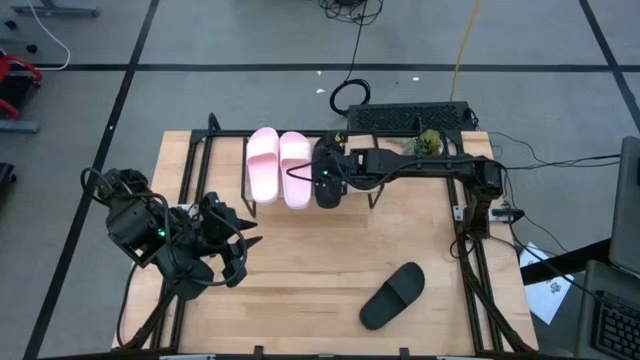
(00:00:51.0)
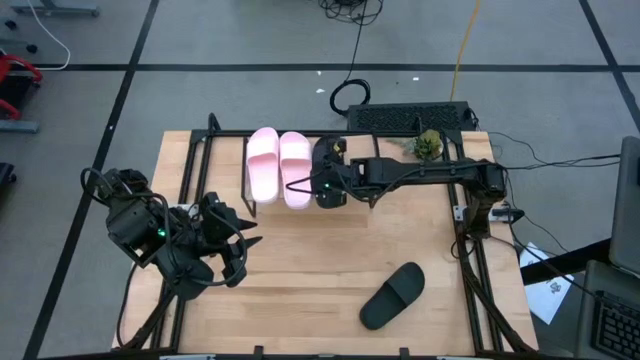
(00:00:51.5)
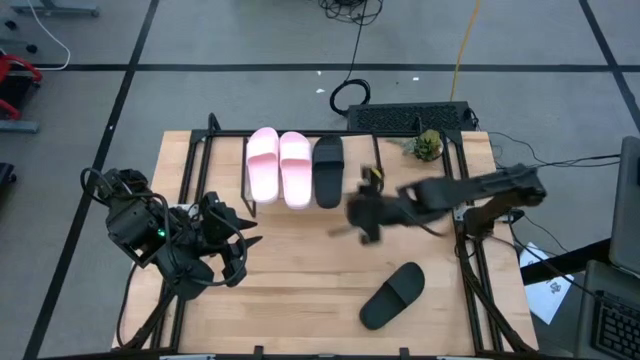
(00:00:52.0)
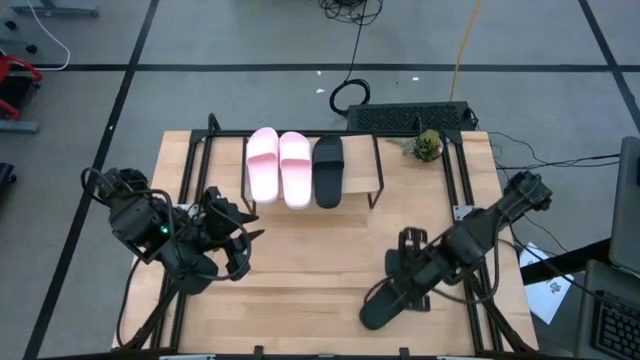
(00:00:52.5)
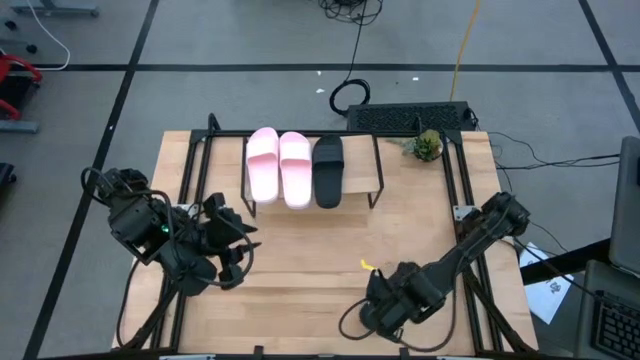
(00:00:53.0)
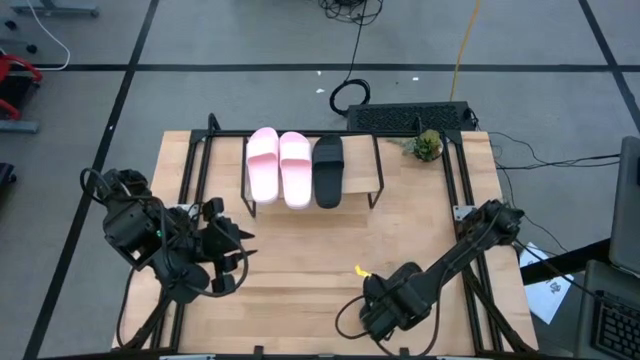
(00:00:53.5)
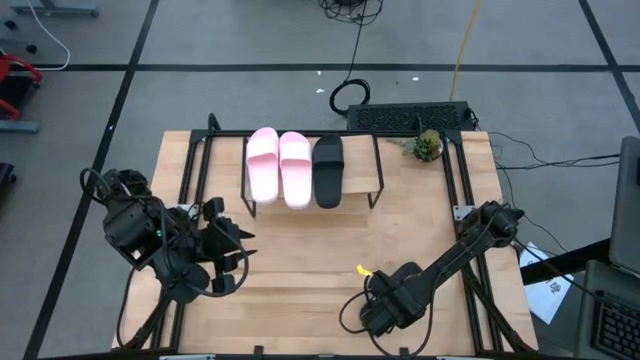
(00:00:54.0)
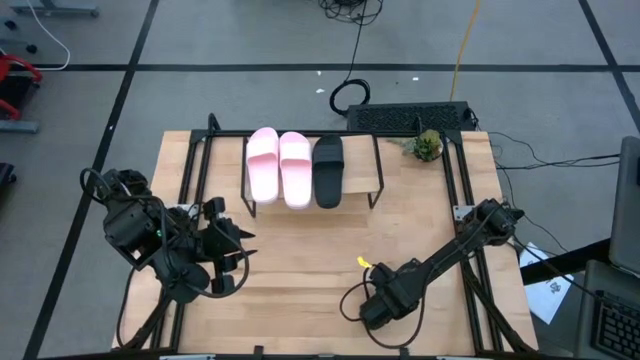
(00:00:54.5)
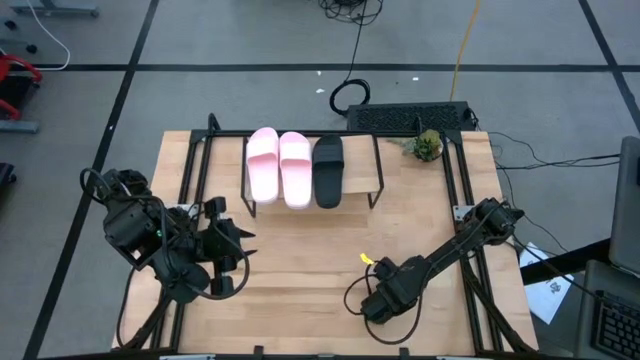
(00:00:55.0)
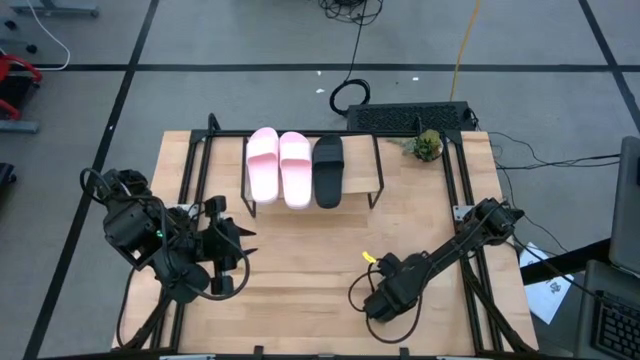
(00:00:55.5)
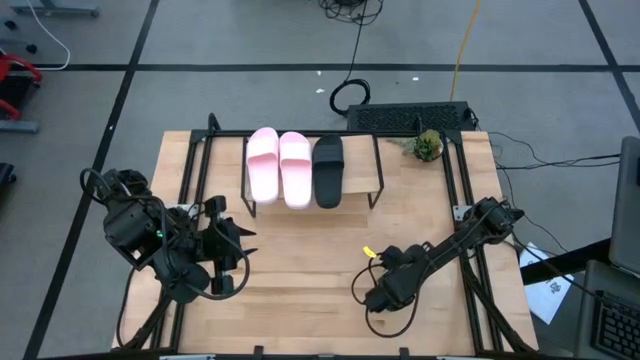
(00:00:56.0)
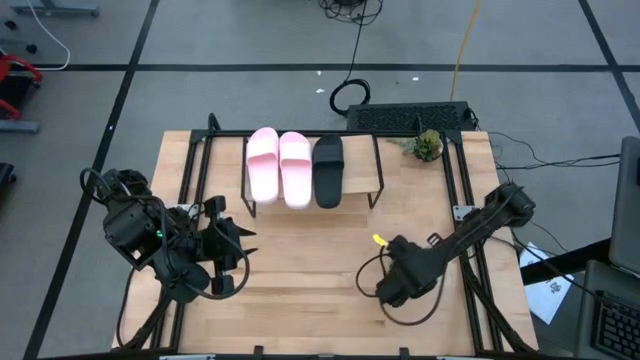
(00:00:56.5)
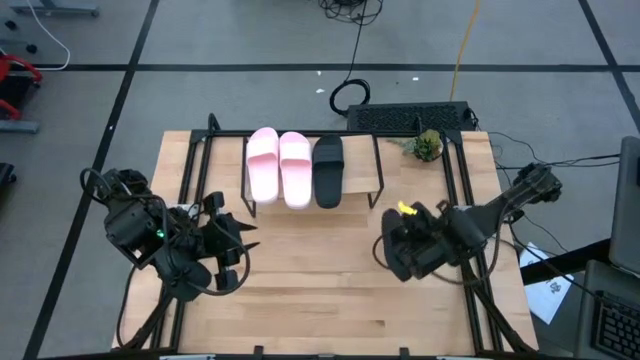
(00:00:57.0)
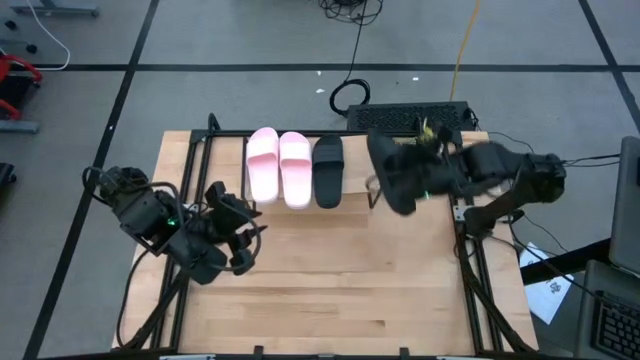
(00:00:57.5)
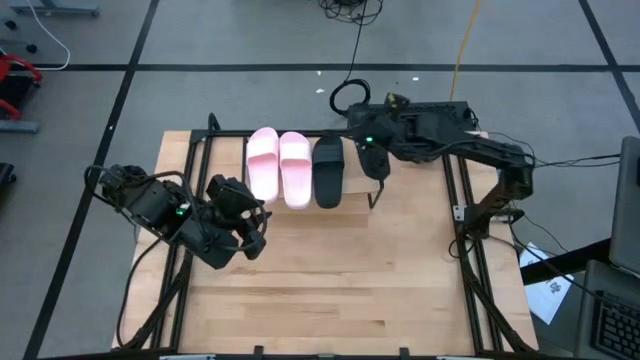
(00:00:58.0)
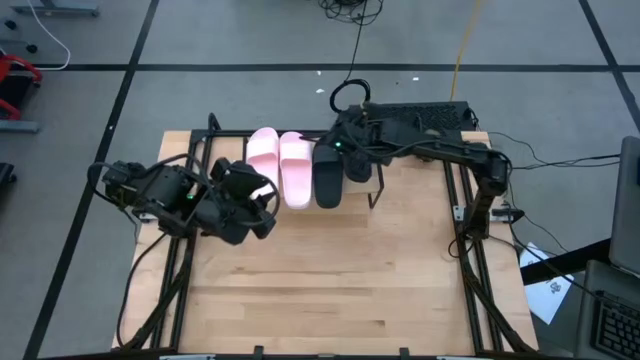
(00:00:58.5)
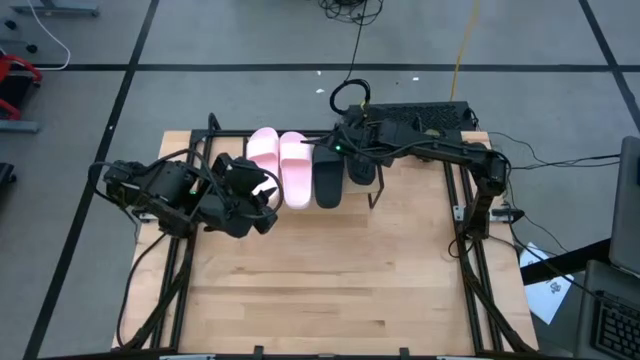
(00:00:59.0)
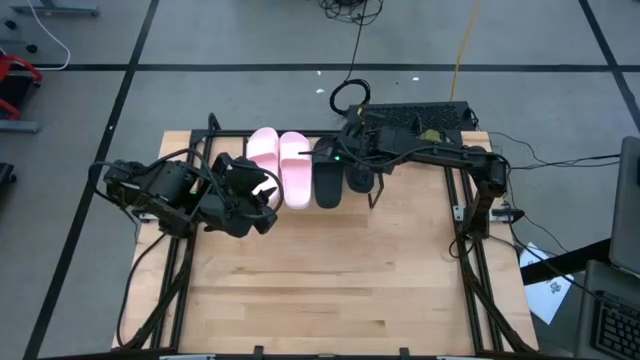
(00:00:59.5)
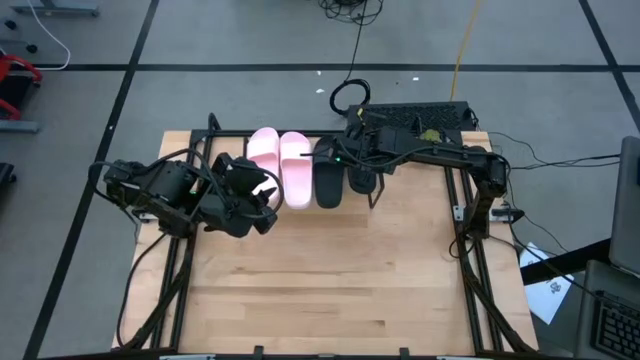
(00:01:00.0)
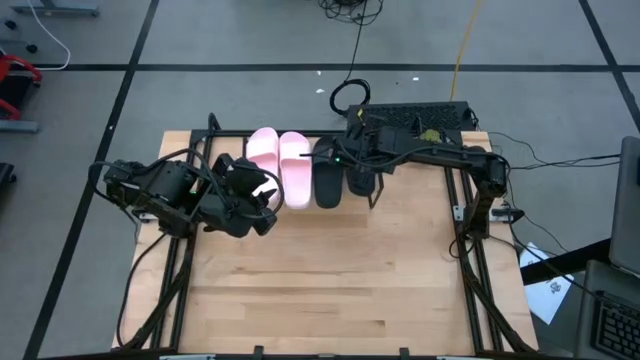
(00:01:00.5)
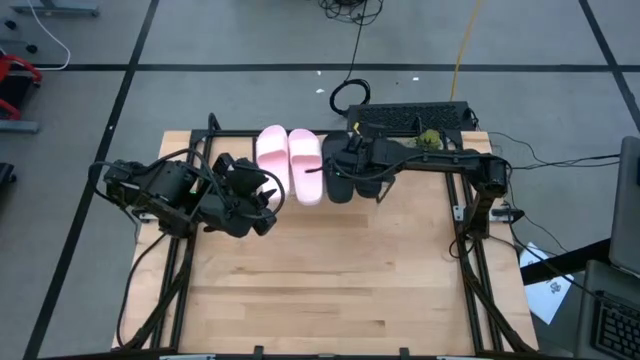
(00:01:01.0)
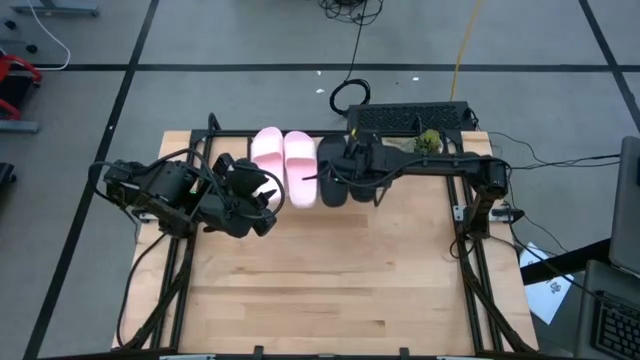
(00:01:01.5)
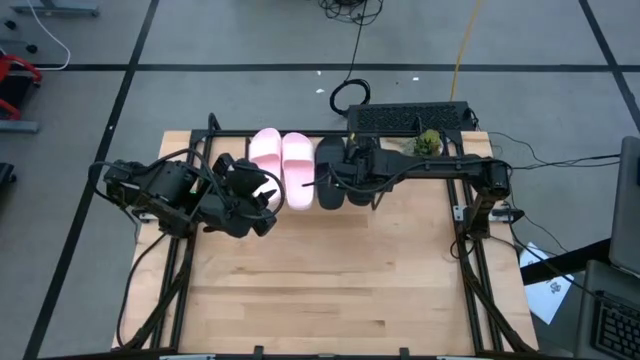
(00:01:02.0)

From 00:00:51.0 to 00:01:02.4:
Task: Pick and place slides into the shelf
Put the black slide on the shelf

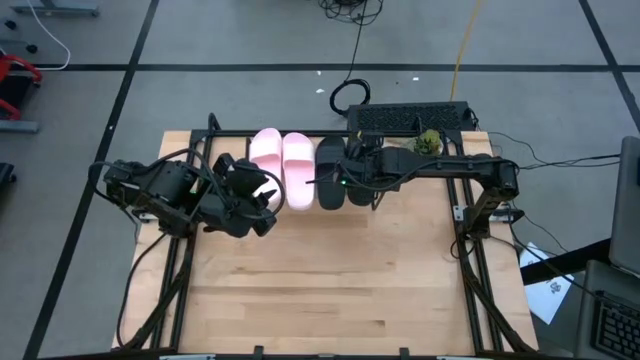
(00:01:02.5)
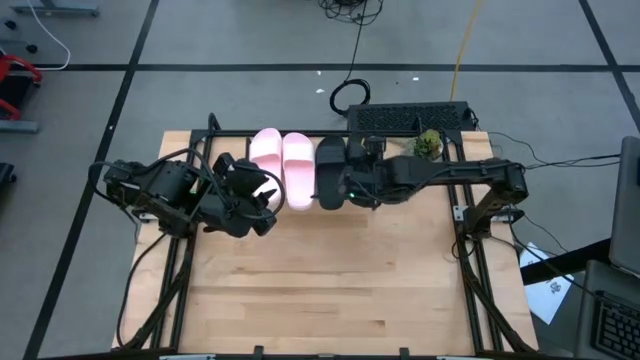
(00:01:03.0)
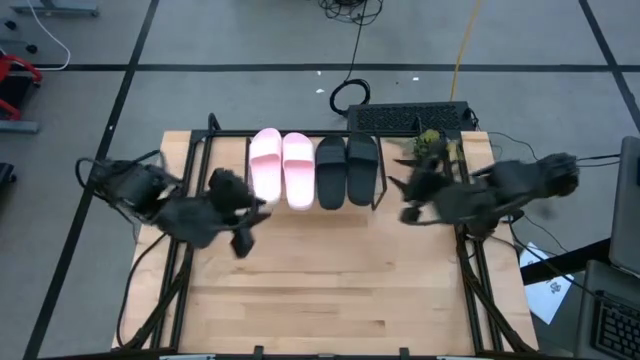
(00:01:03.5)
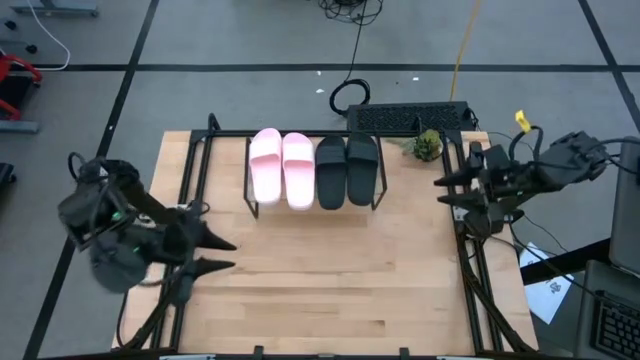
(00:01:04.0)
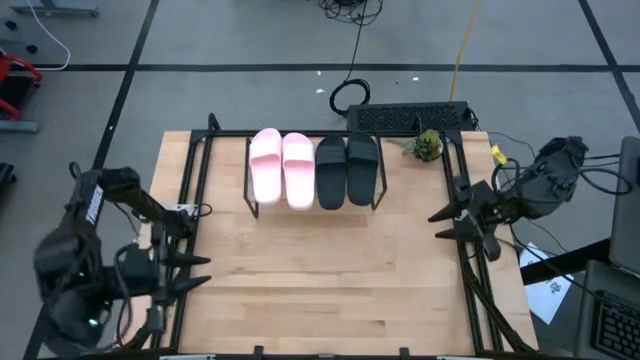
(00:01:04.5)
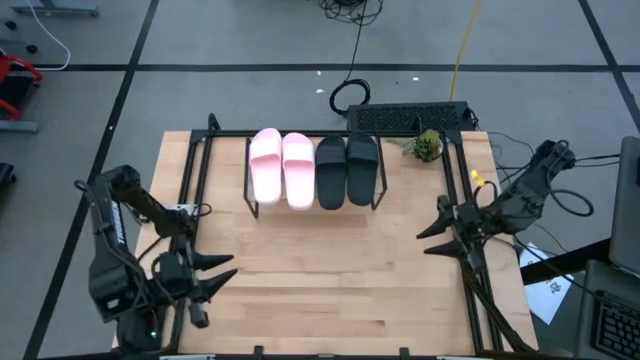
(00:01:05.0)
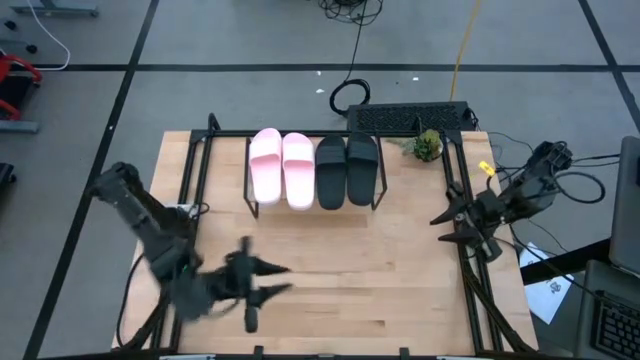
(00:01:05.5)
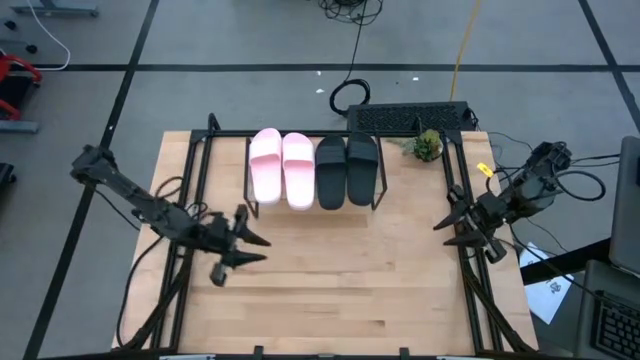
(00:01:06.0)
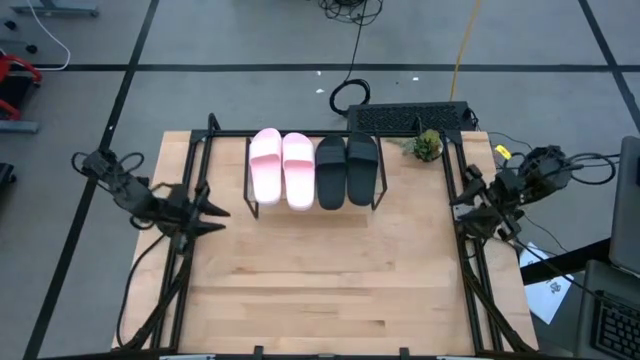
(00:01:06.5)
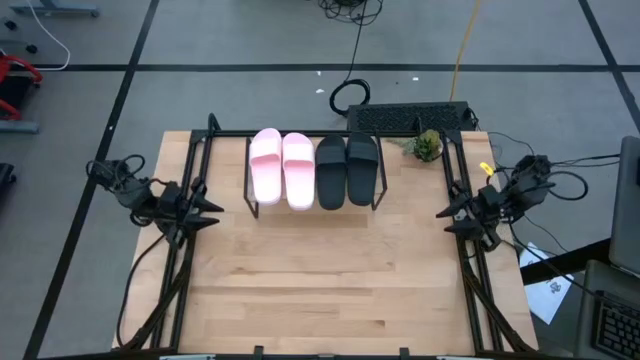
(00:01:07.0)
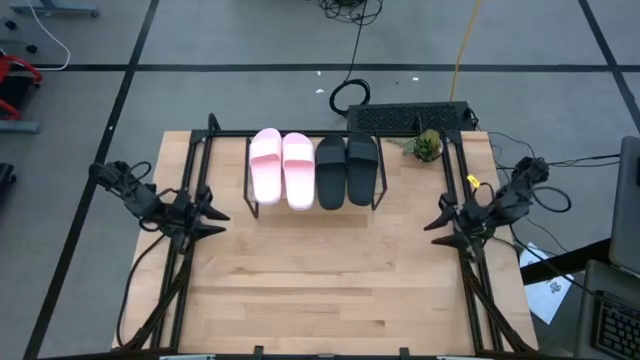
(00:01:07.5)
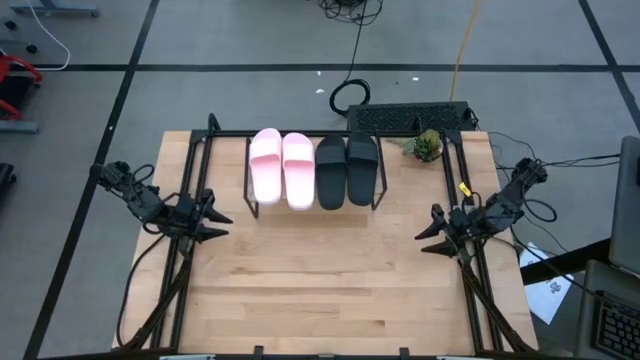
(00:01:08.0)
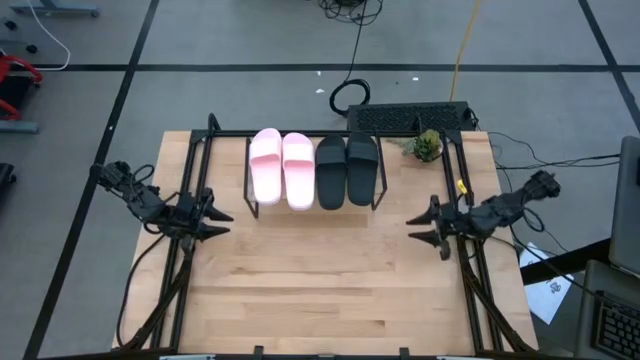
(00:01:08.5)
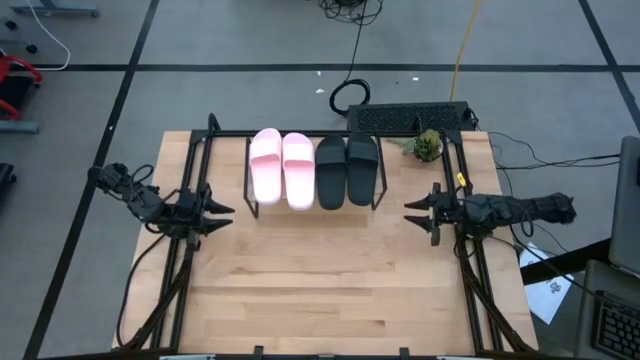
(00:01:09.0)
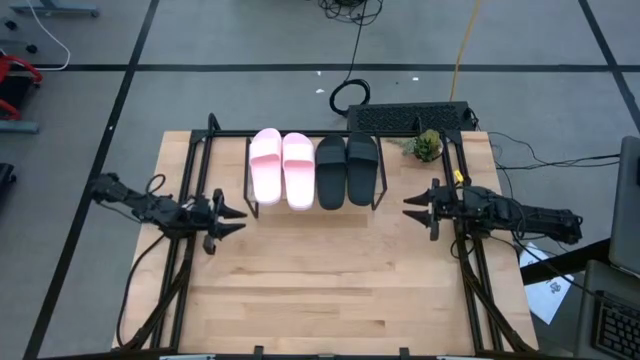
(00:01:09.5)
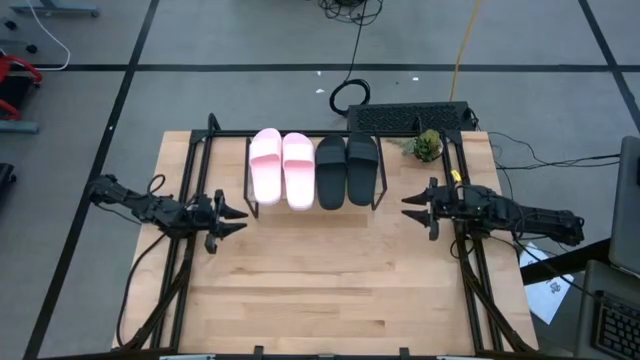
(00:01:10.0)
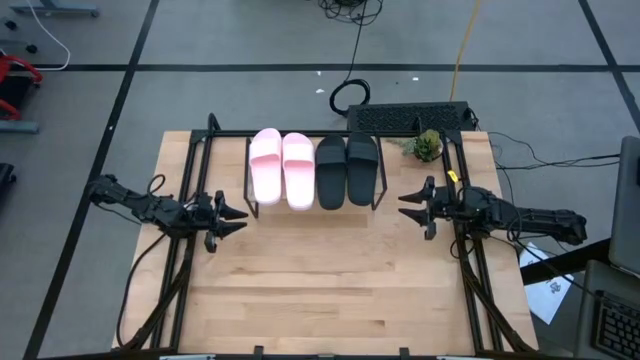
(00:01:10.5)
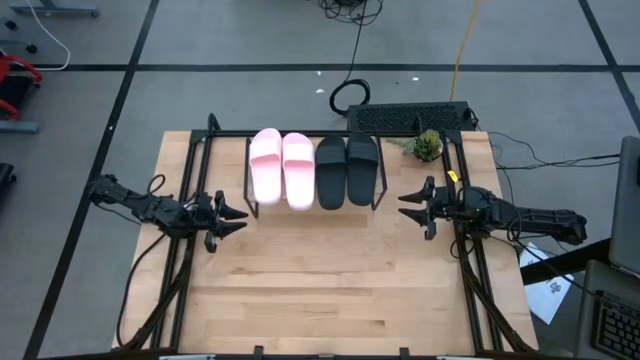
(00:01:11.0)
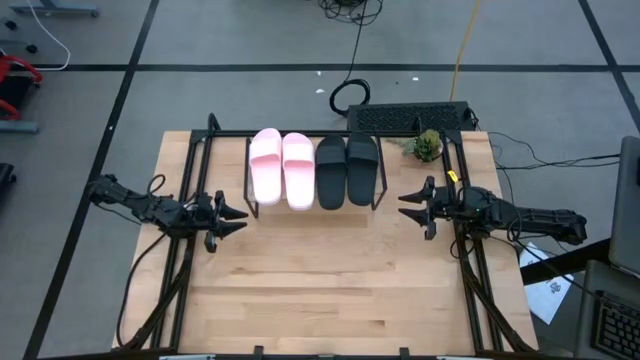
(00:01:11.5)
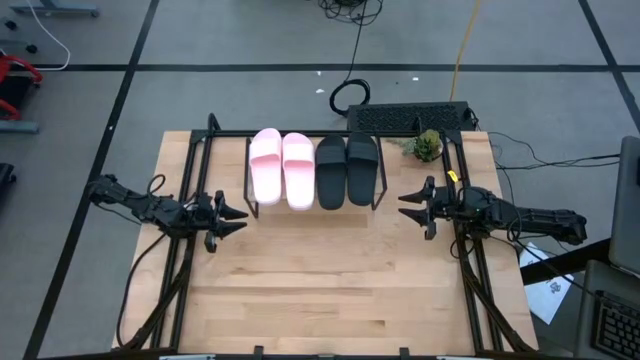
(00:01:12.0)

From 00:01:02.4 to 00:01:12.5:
Return to Home Position
